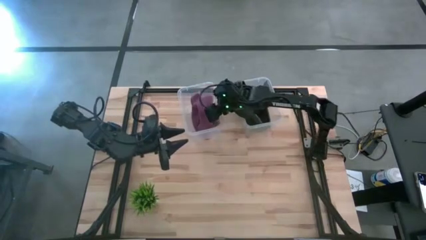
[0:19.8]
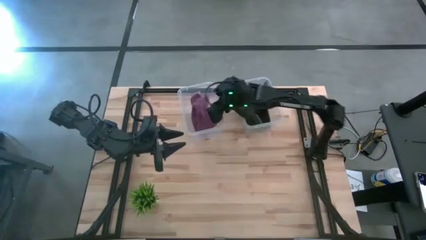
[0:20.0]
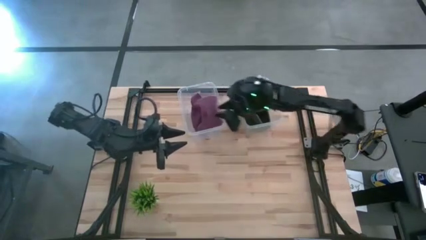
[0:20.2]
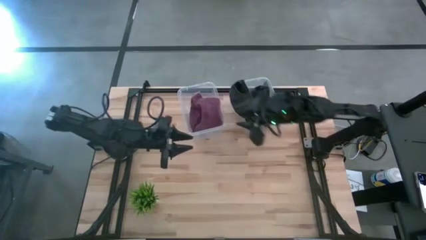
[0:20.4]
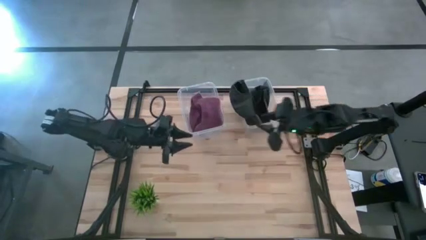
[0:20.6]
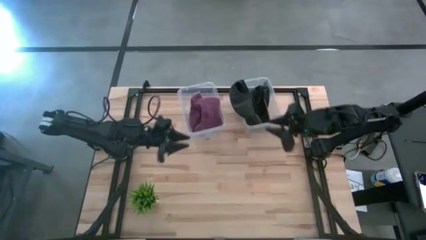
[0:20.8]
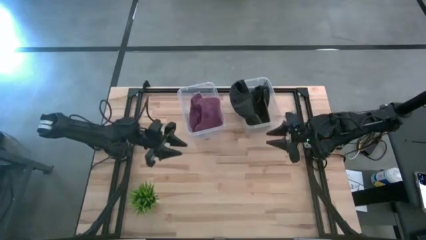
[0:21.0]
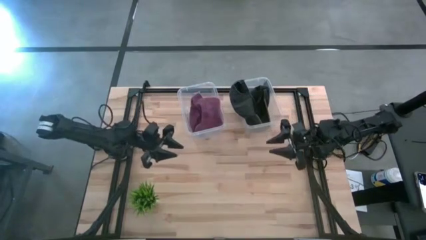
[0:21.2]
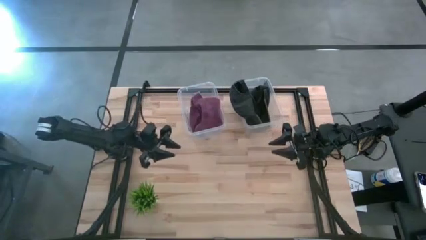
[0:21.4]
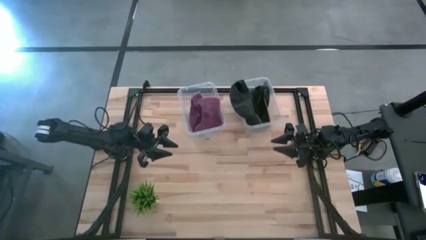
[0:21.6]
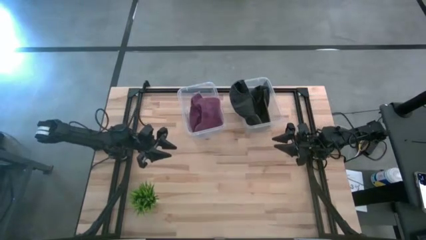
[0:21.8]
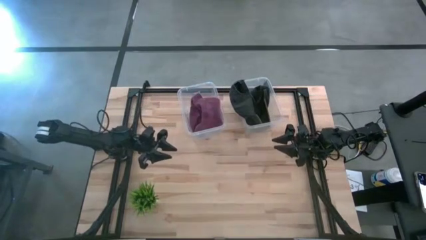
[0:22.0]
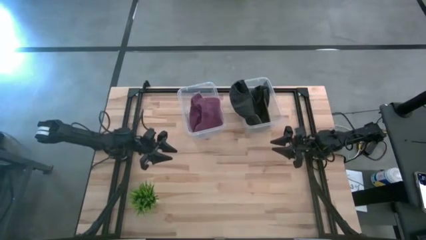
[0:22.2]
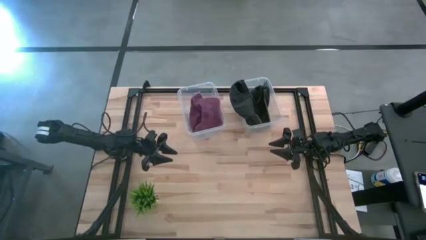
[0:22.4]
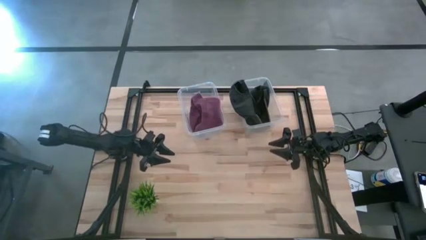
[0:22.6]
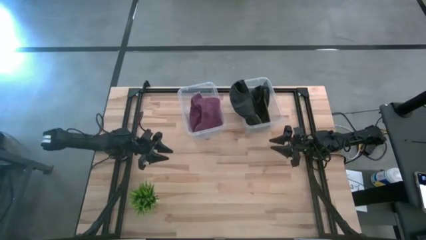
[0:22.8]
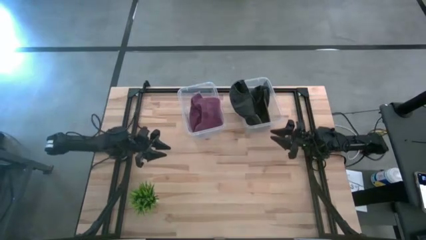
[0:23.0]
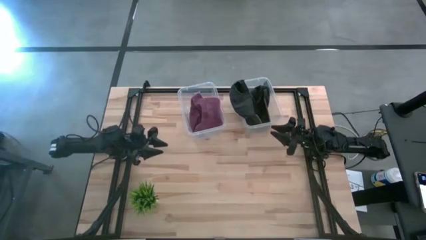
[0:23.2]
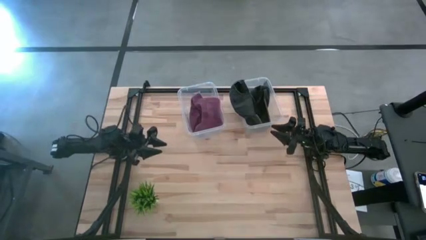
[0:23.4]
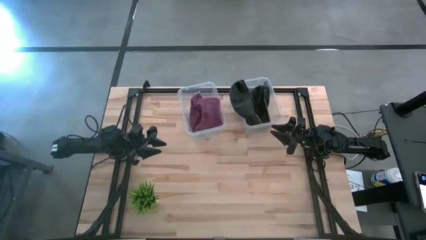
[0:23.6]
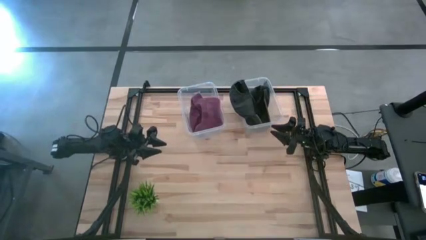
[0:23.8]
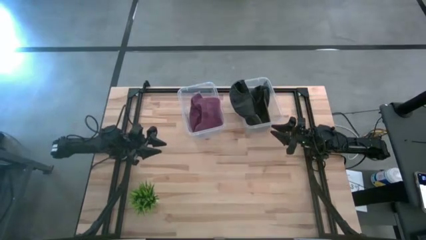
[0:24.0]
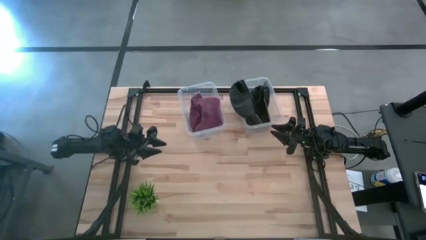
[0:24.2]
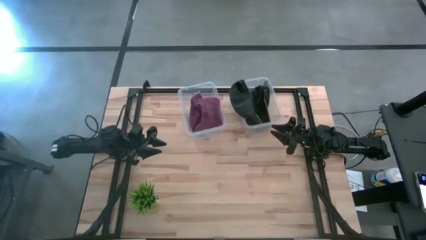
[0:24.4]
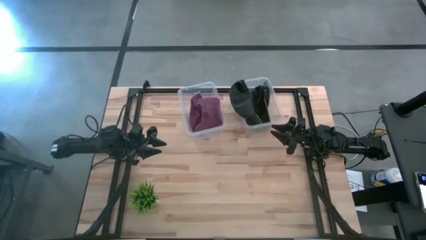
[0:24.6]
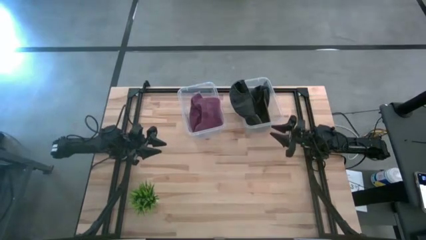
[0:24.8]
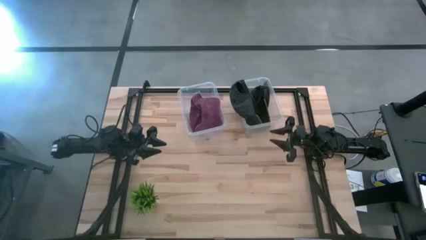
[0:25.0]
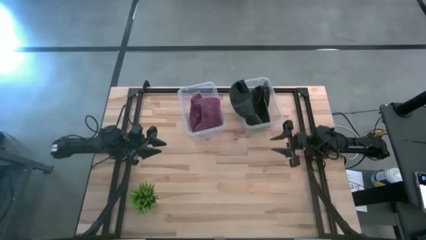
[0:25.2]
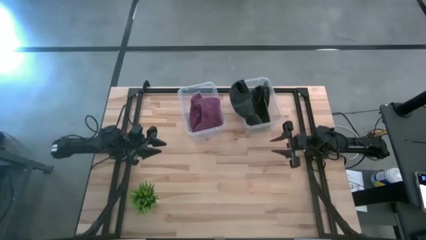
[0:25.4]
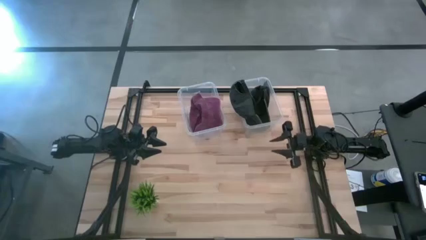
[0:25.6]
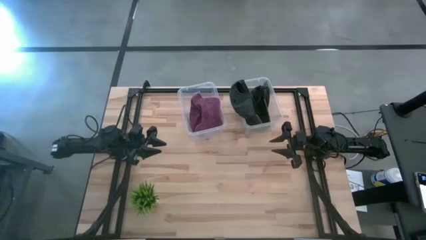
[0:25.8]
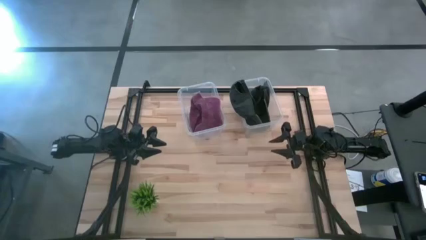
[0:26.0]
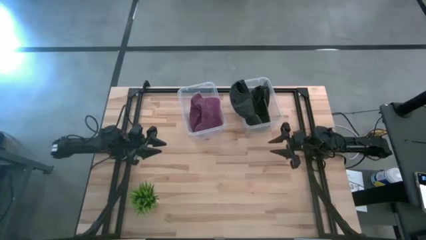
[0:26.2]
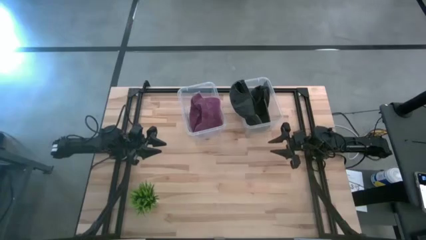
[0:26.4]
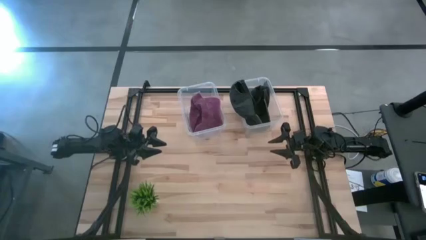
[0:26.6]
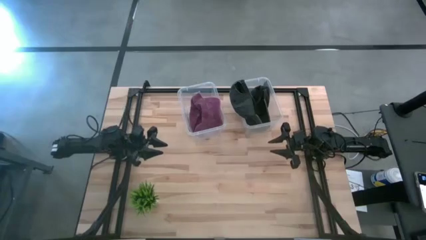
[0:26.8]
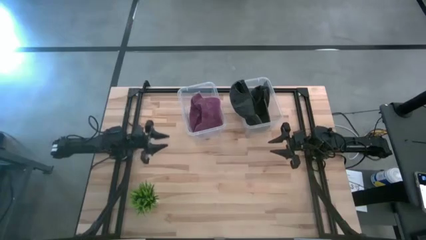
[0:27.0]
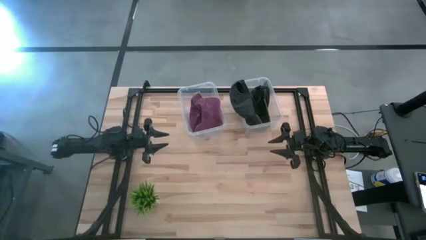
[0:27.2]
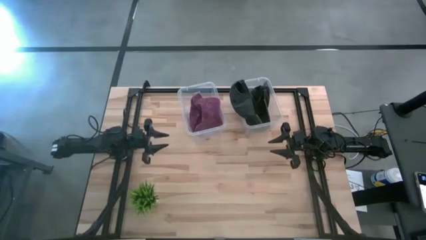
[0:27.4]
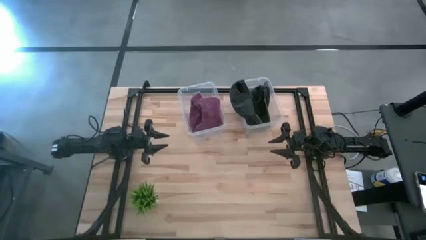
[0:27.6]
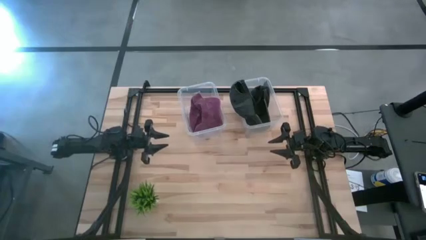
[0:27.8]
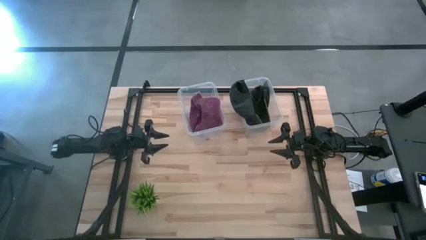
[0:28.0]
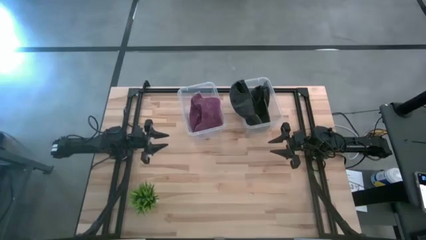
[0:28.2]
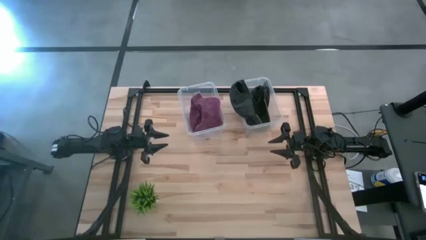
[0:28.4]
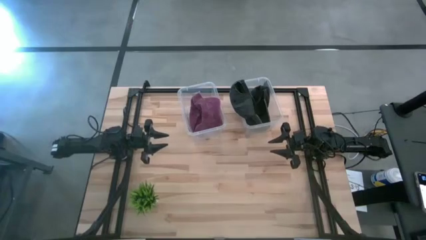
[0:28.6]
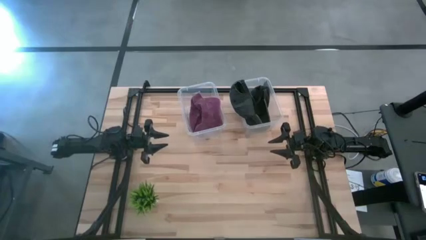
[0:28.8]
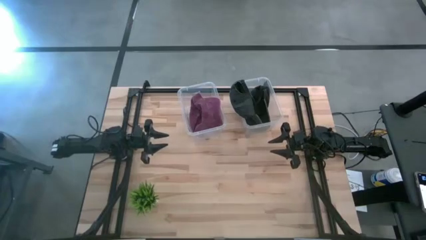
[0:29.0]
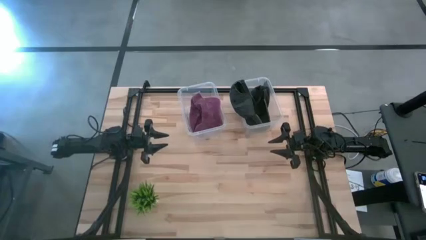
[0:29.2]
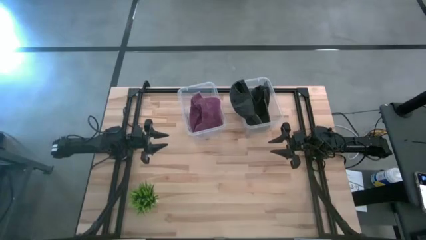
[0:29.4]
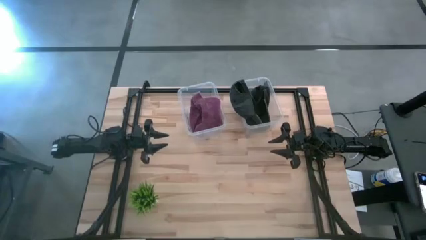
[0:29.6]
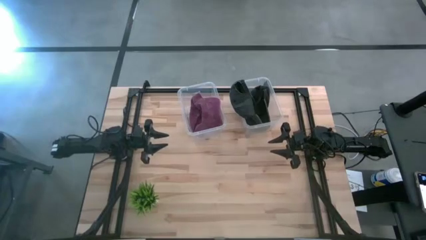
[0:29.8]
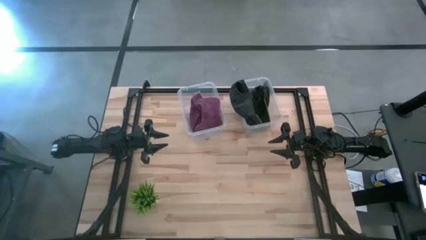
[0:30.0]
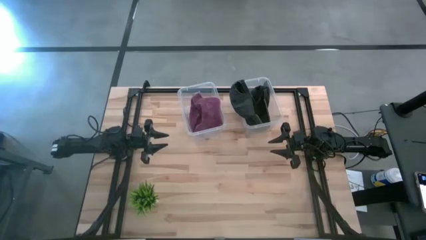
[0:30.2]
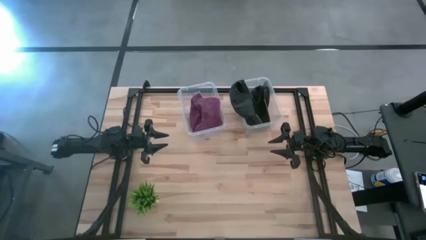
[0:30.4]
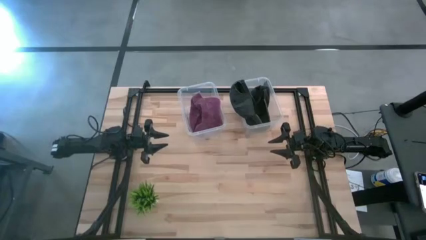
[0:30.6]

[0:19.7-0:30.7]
Task: Pick & Place hat
Return to Home Position

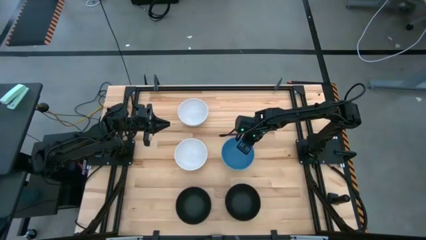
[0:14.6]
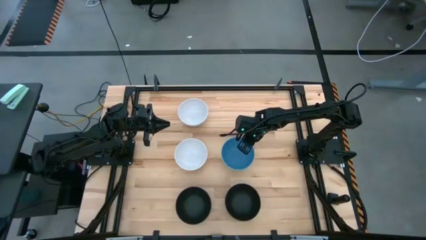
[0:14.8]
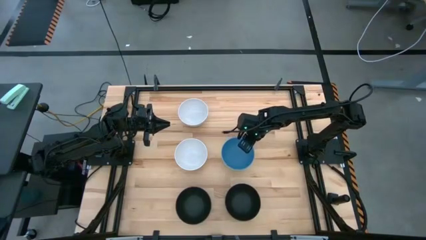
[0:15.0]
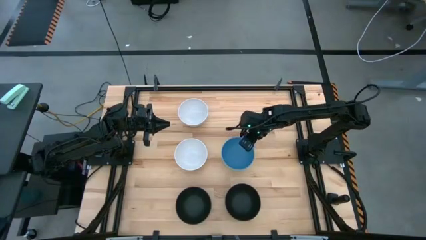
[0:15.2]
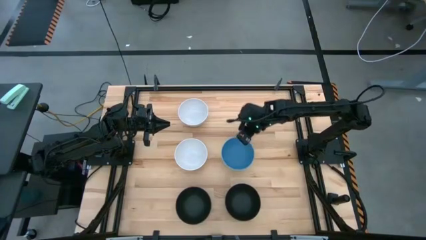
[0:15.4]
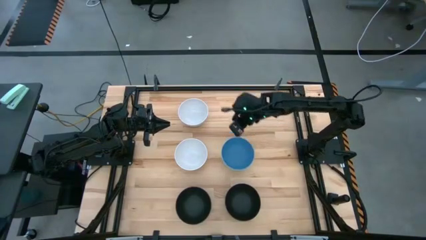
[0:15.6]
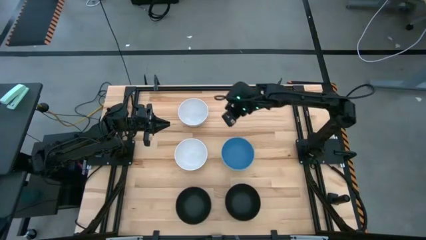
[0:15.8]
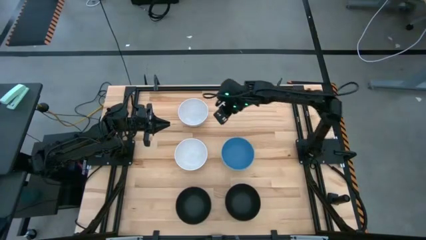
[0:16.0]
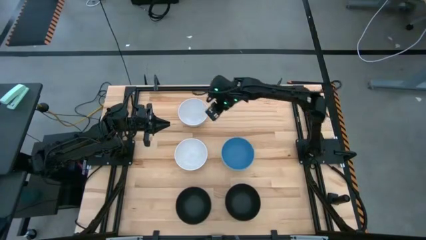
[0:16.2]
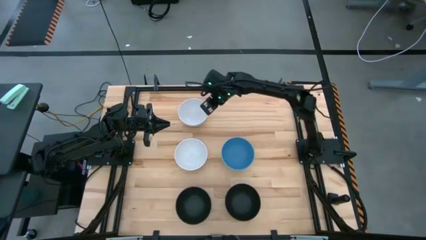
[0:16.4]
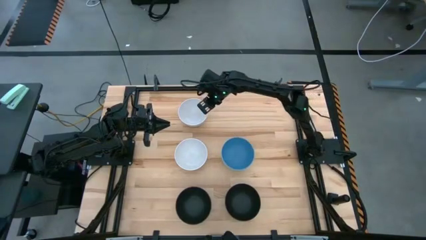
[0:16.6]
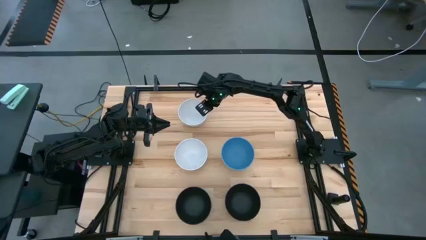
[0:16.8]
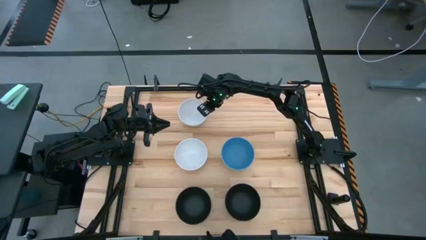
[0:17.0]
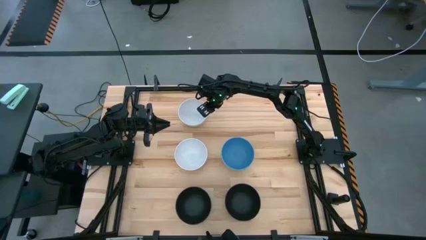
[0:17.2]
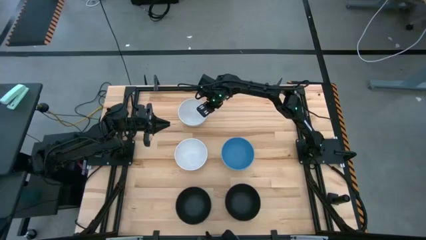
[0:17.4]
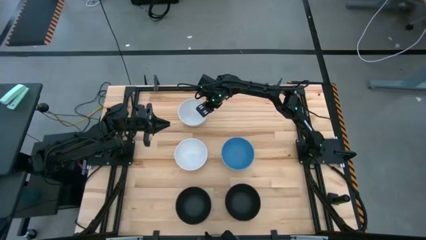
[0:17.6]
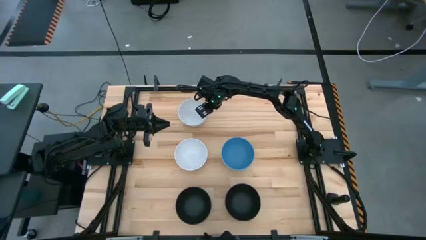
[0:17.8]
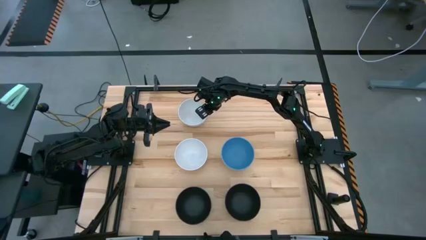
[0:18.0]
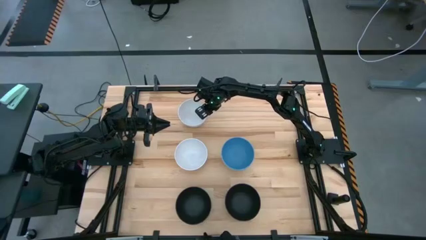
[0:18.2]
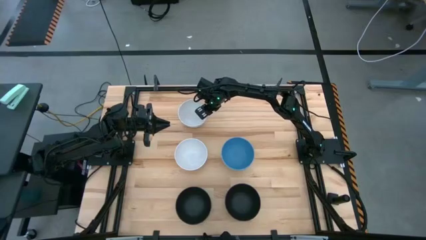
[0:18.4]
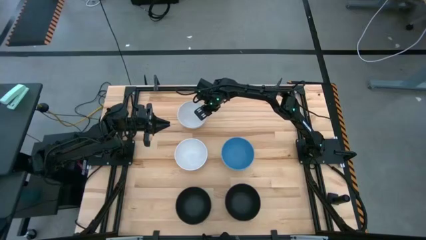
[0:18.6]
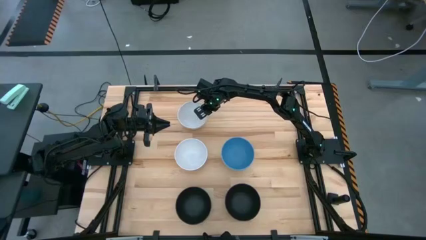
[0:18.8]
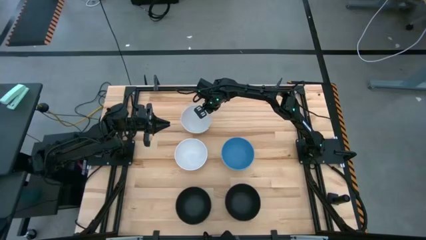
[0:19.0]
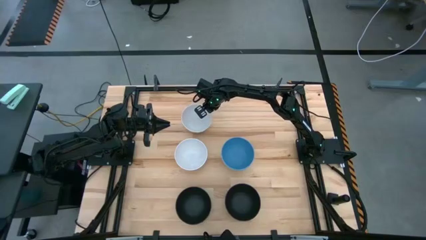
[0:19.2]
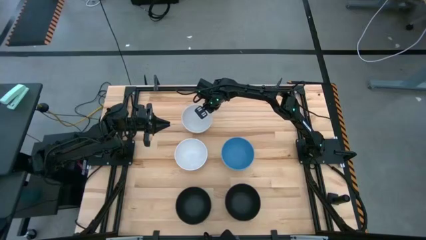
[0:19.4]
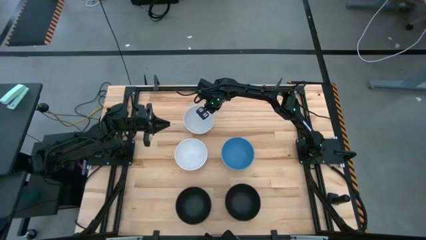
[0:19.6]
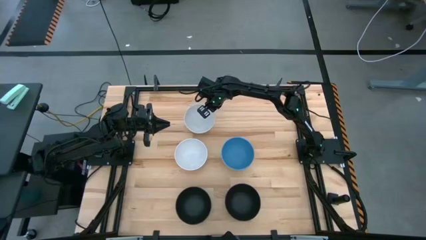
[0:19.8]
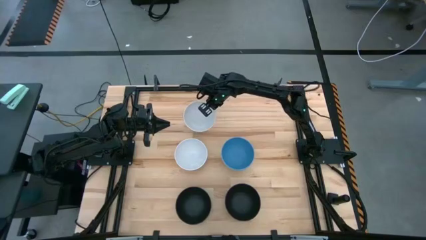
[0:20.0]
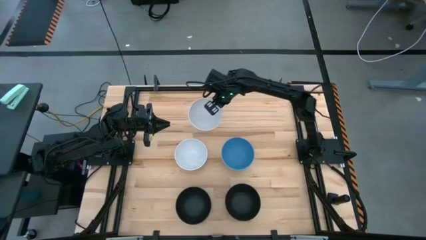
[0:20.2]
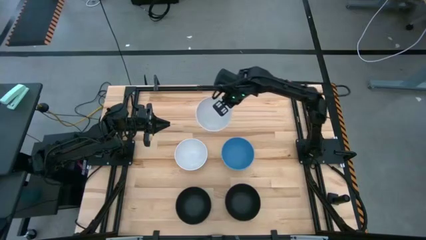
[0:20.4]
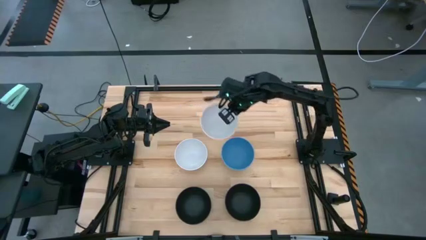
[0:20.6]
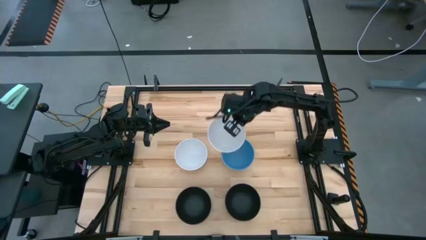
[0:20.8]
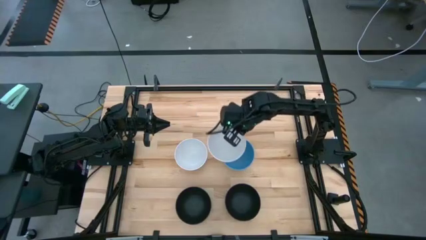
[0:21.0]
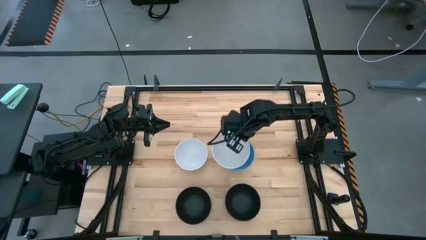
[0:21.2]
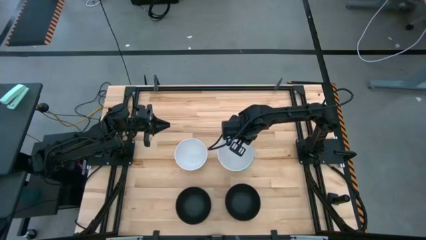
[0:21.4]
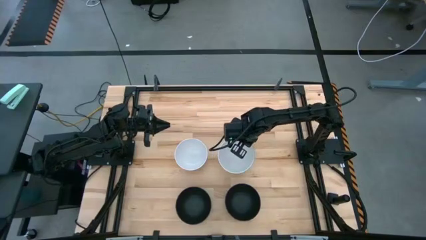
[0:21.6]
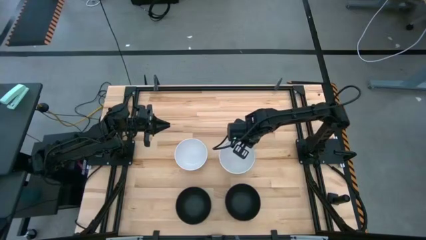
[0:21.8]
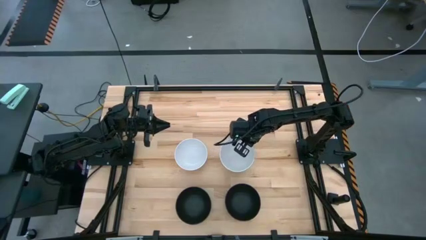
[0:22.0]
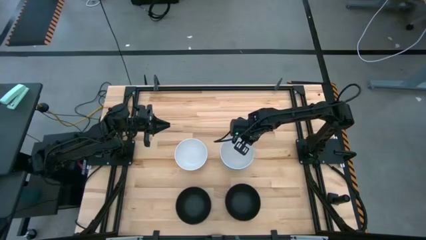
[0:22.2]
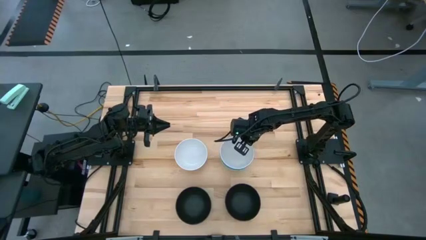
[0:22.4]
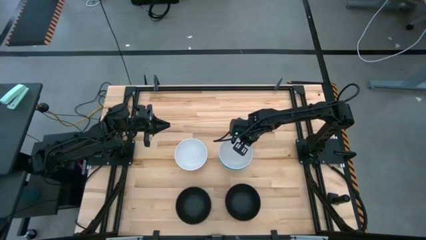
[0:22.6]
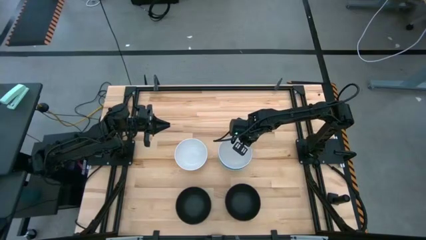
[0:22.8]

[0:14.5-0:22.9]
Task: Nest bowls inside each other
Stack the top white bowl on the blue bowl
